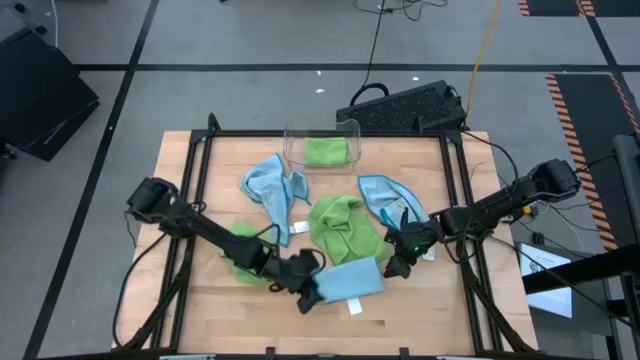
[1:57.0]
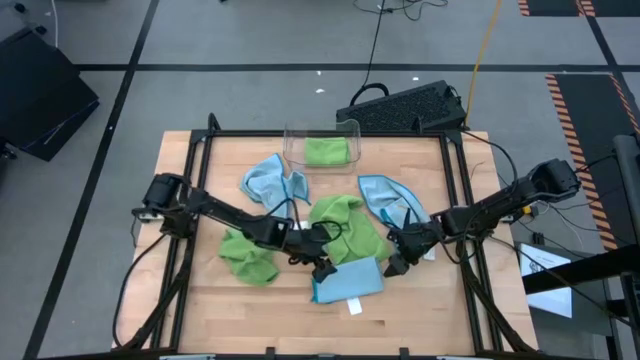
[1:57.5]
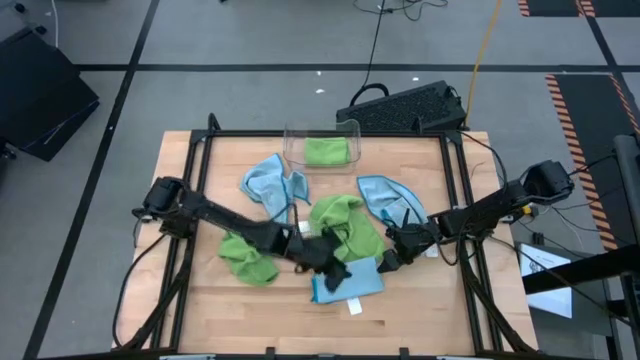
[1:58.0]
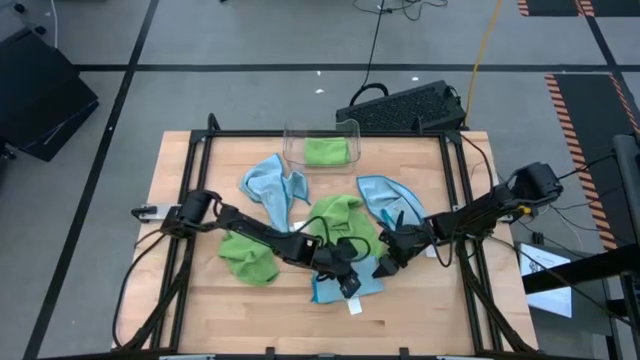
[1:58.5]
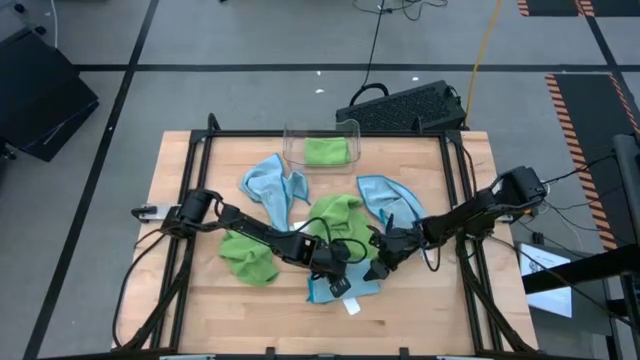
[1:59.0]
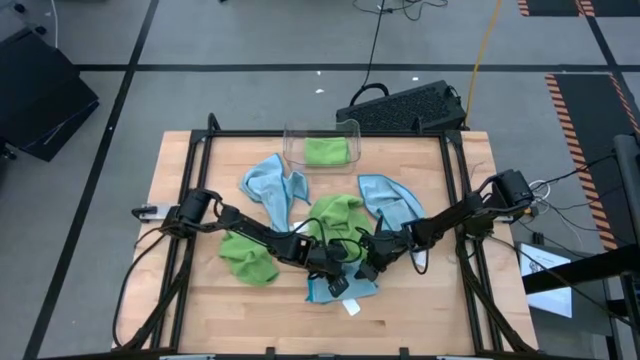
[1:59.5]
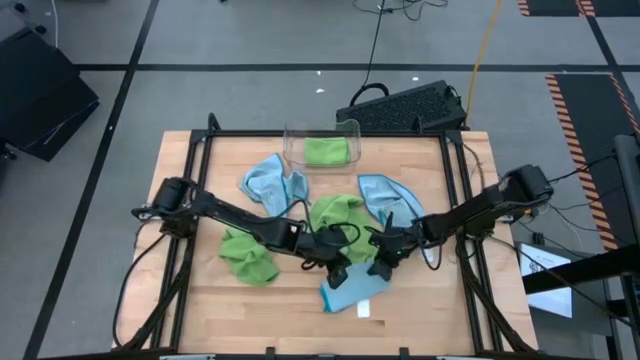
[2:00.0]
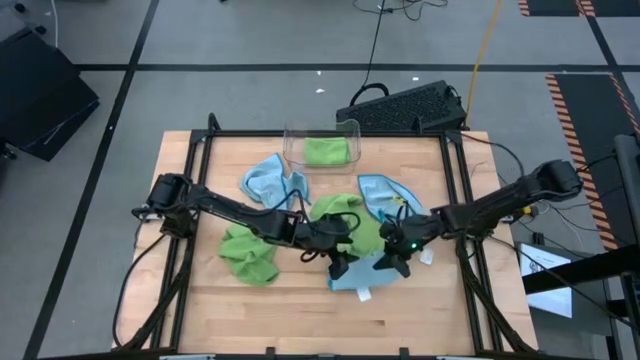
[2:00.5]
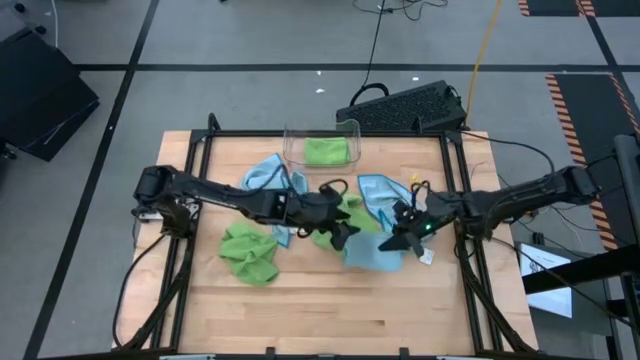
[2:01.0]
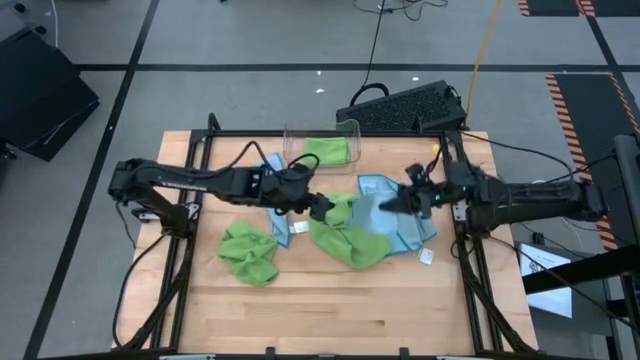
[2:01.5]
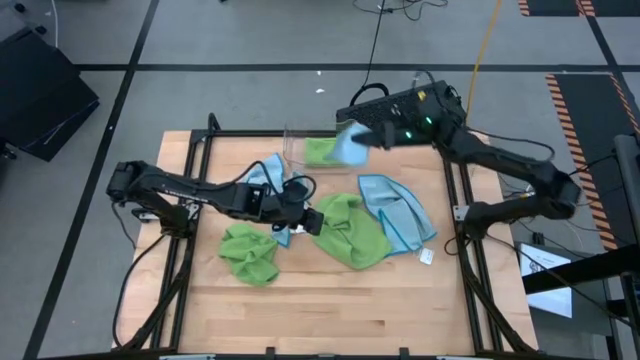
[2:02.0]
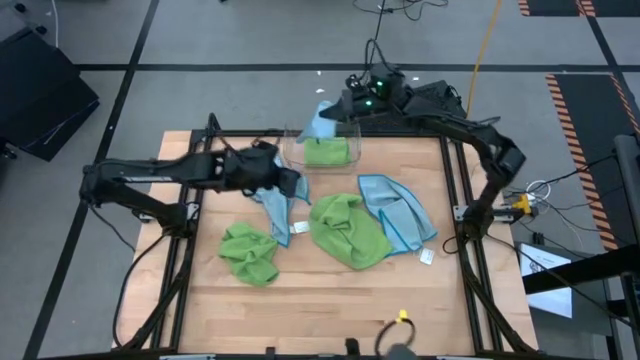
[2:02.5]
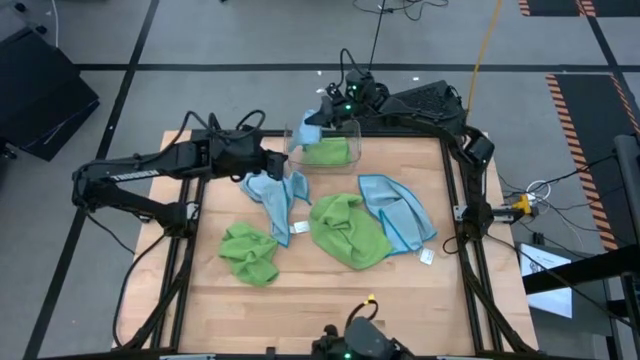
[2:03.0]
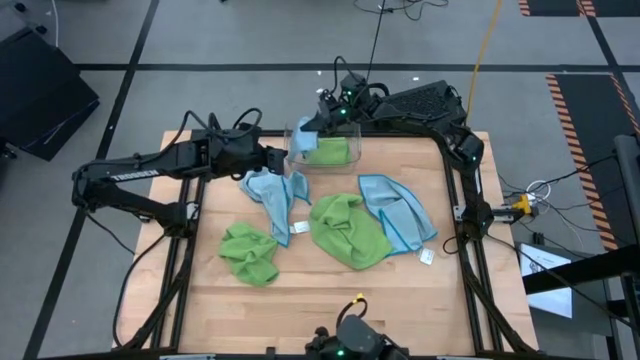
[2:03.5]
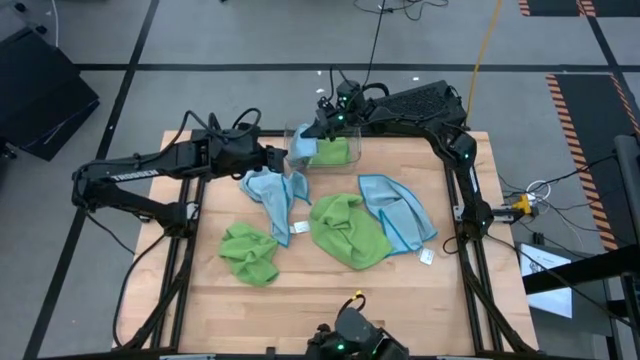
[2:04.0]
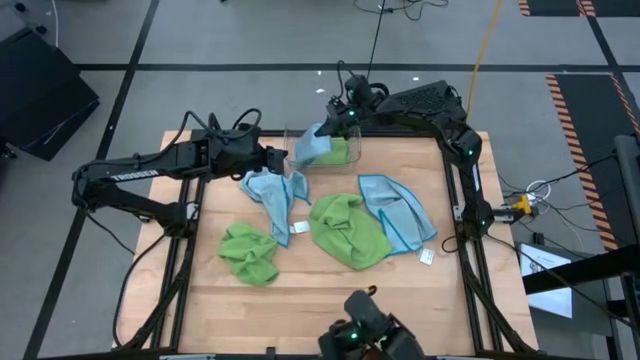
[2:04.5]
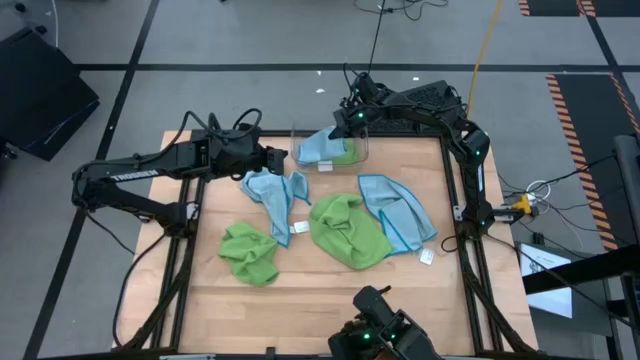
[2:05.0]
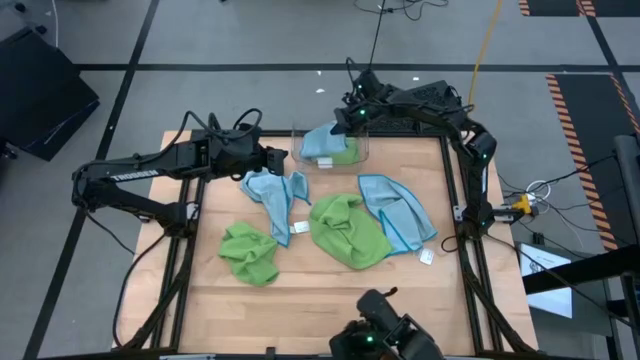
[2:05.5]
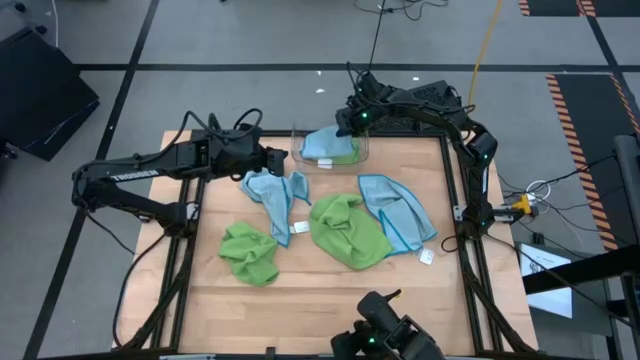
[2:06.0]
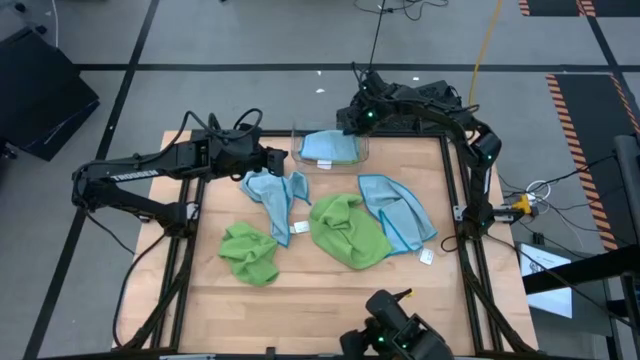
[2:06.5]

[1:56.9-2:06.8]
Task: Fold microfiber towels
Put the bottom folded blue microfiber cloth into the transparent bin

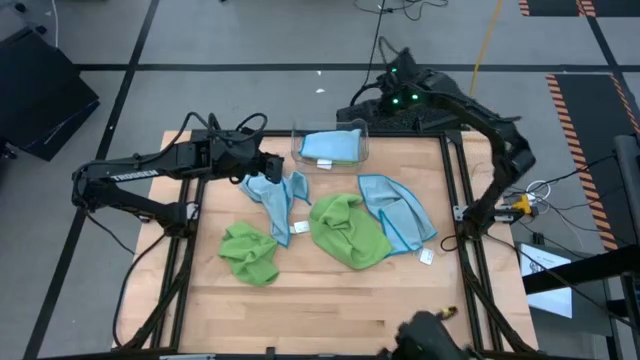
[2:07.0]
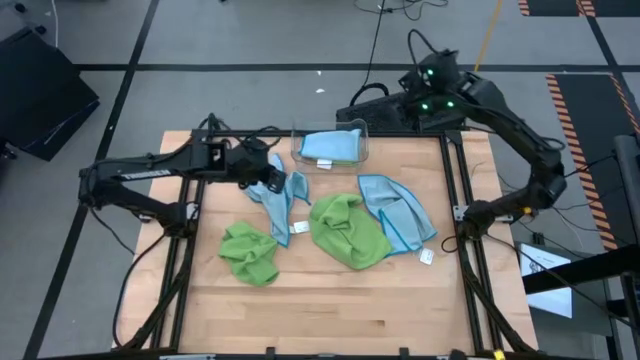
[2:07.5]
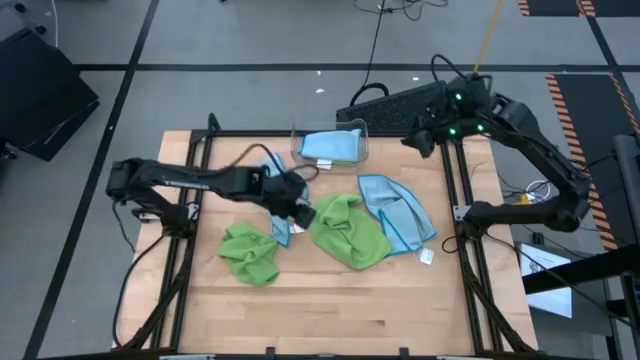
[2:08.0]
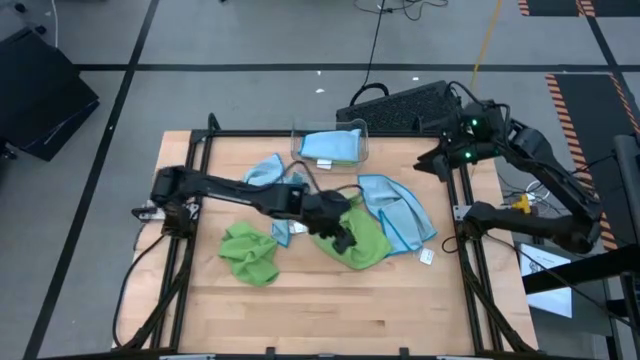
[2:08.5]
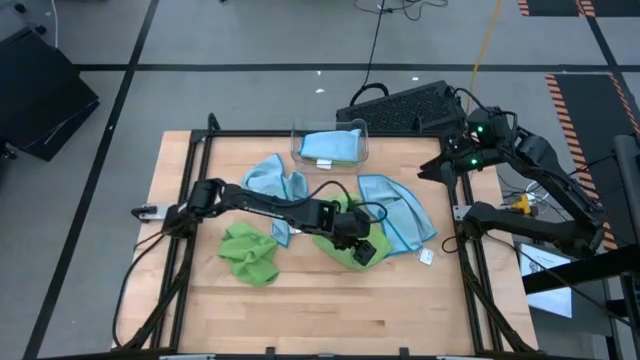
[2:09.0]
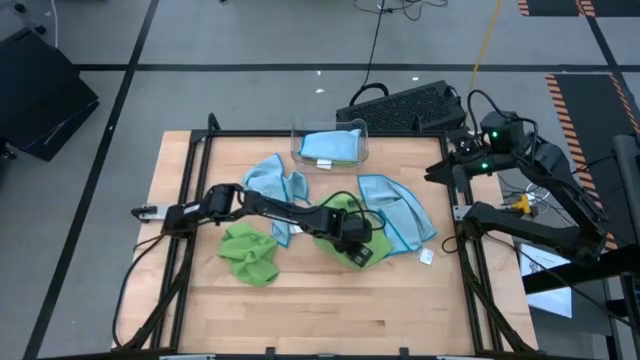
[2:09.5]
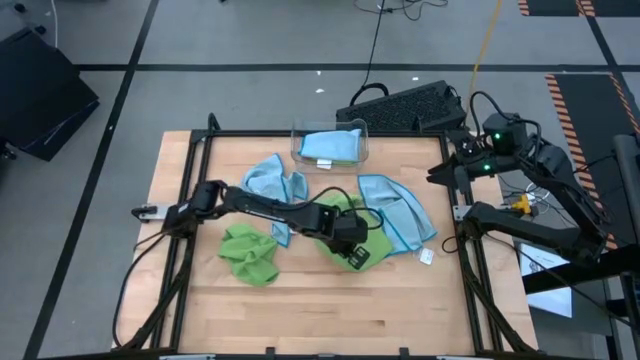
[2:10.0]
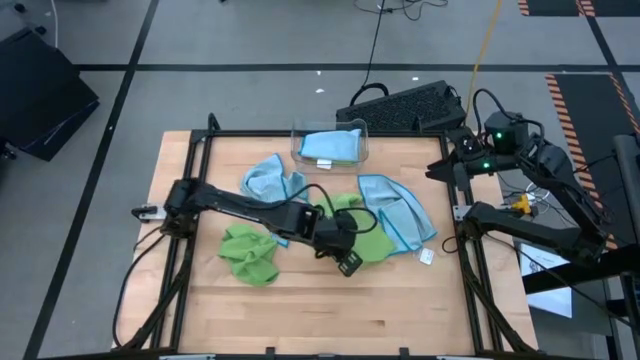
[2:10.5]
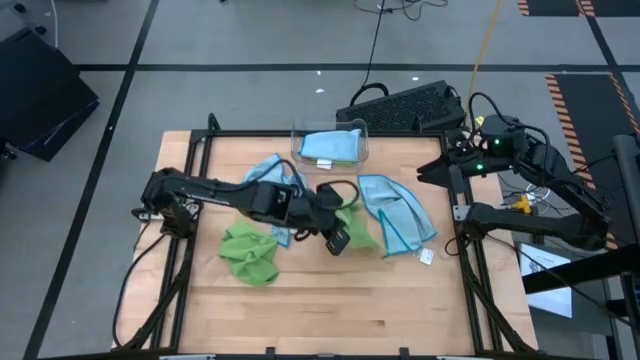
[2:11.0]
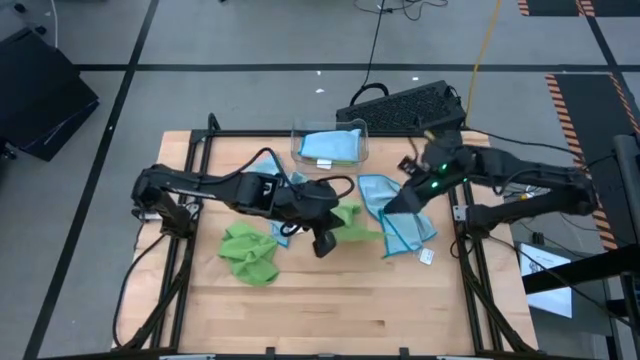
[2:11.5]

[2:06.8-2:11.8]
Fold the right green microfiber cloth

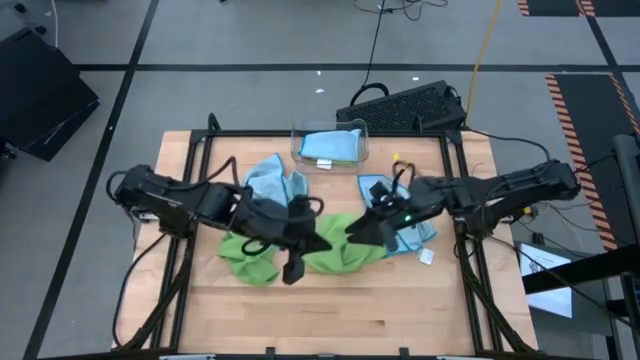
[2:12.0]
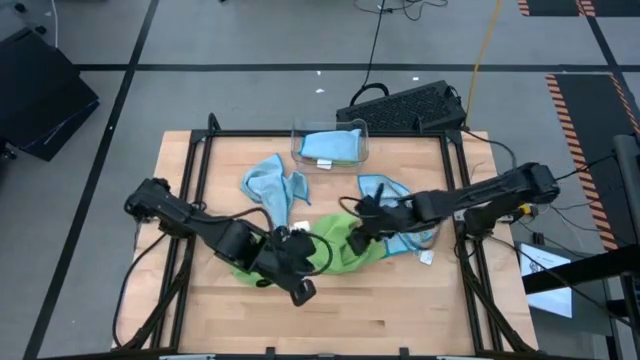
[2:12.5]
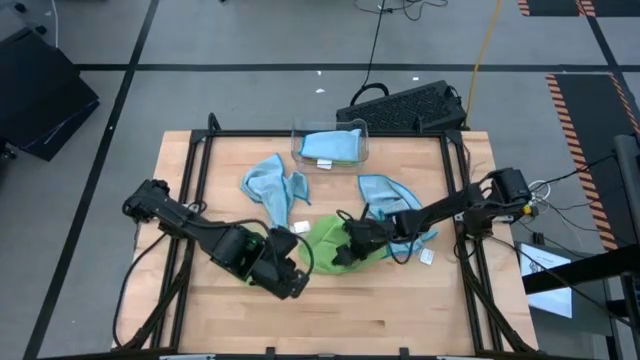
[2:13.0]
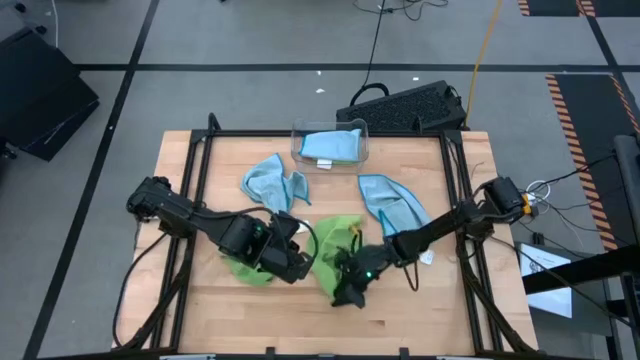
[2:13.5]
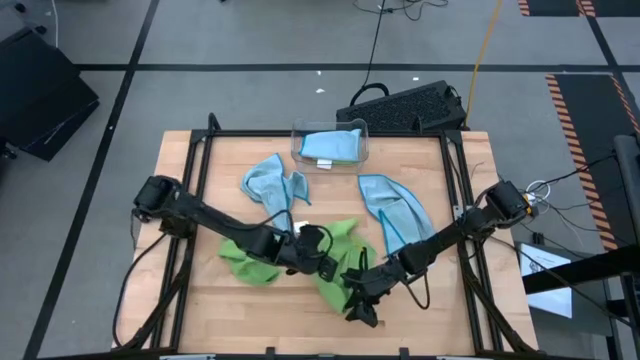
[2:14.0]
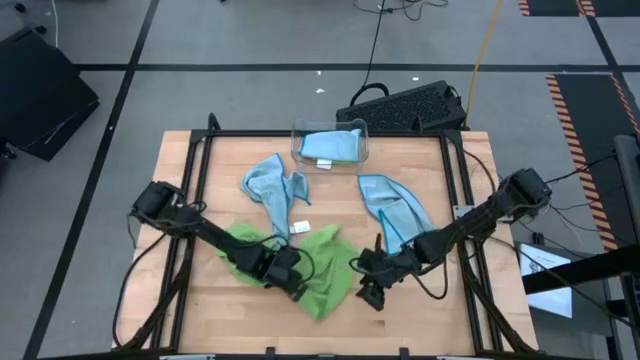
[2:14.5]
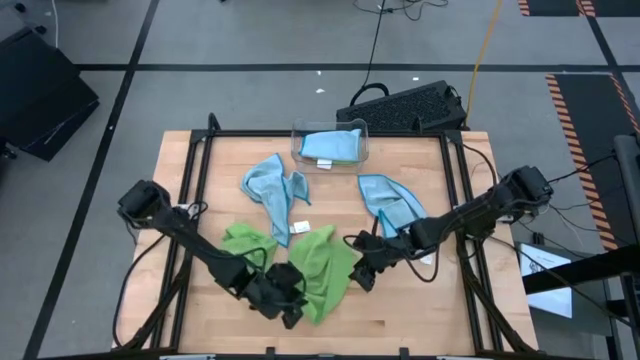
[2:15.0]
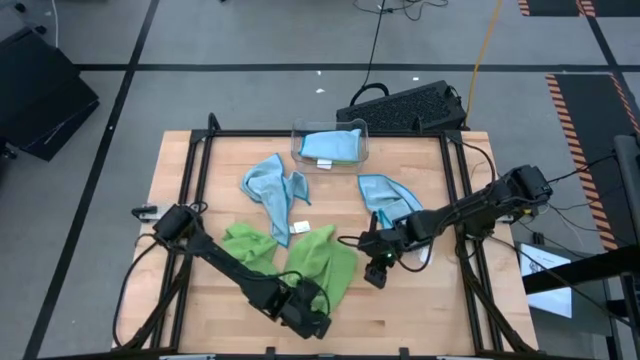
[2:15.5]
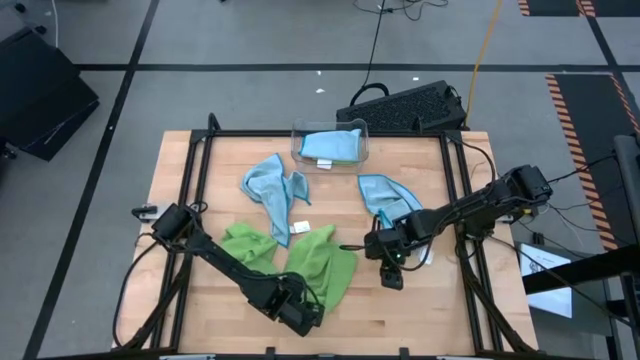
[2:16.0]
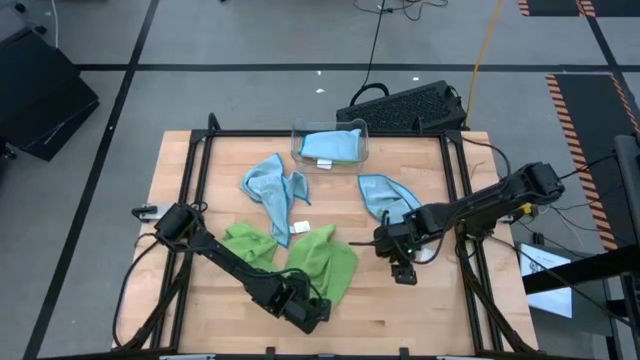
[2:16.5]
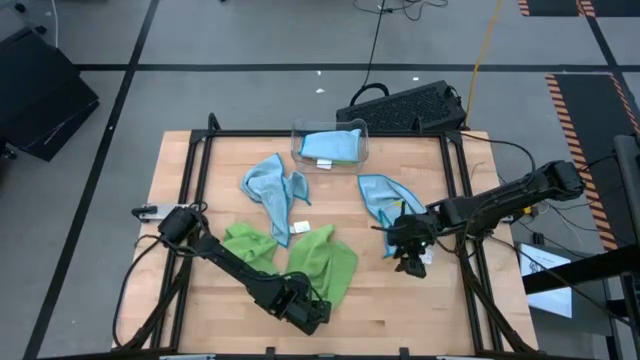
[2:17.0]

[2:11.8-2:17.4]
Fold the right green microfiber cloth

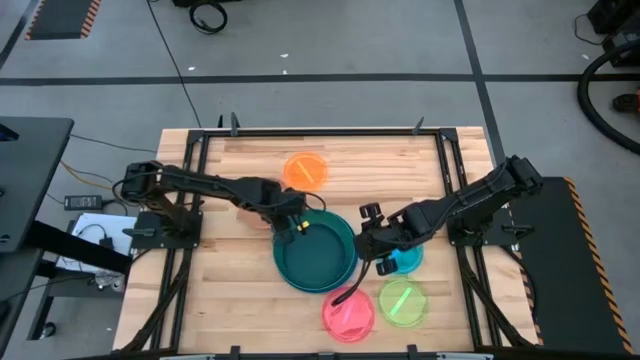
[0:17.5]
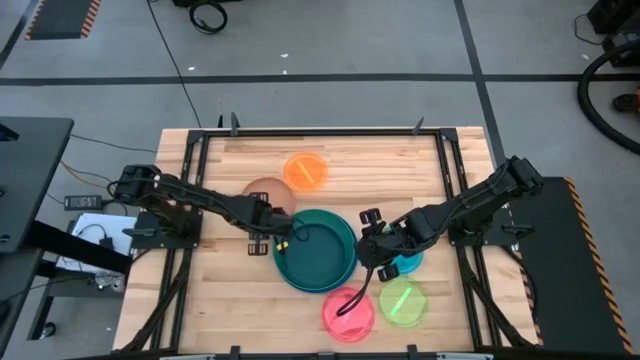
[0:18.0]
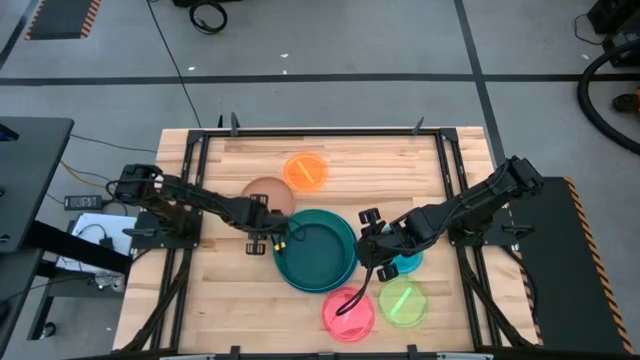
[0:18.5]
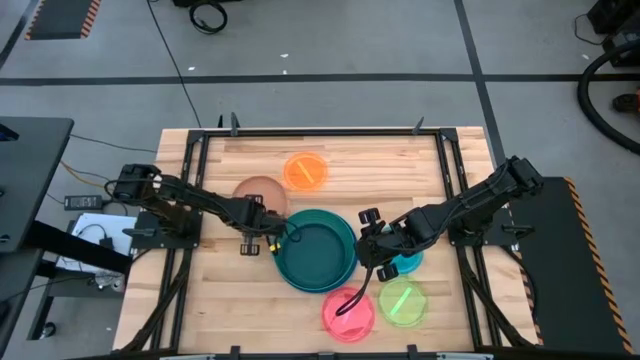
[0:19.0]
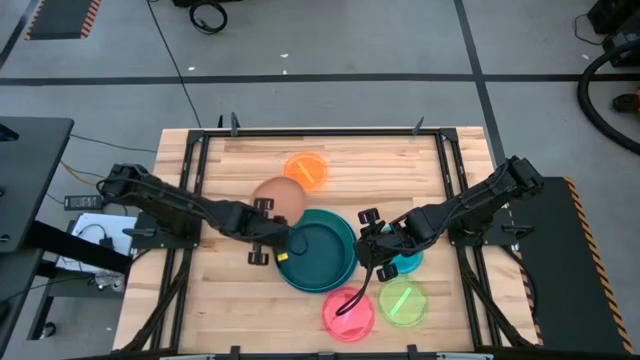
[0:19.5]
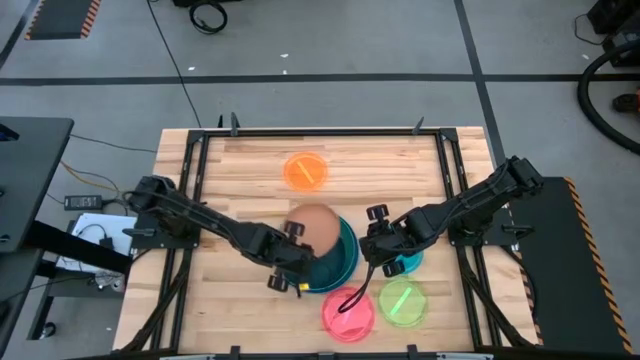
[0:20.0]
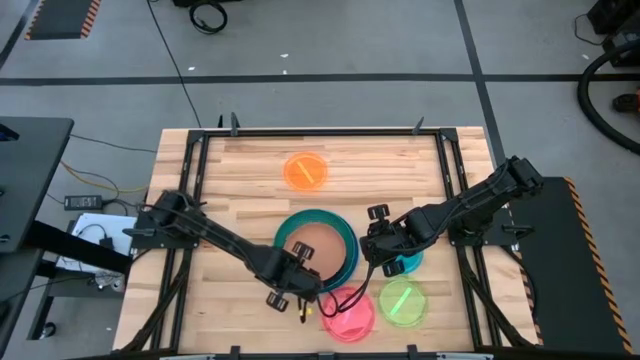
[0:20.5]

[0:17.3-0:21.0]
Task: Stack plastic plates
Stack the brown plate on top of the dark green plate
